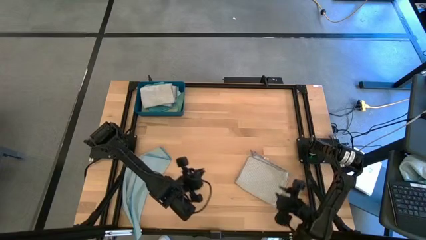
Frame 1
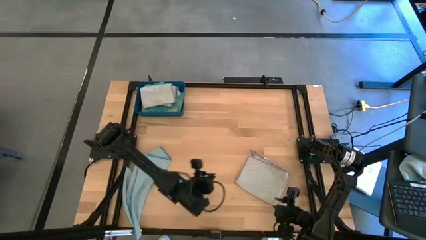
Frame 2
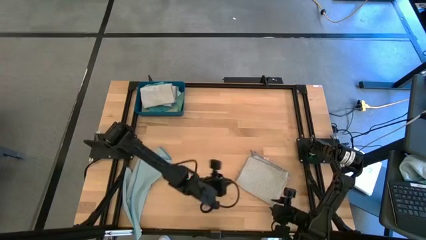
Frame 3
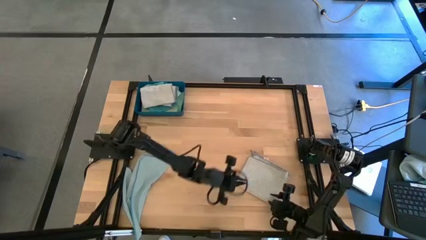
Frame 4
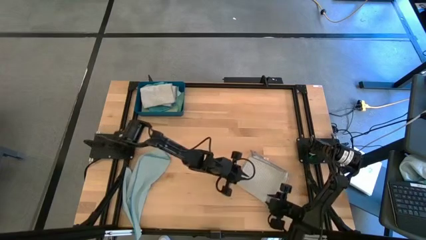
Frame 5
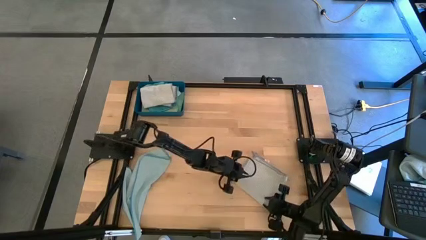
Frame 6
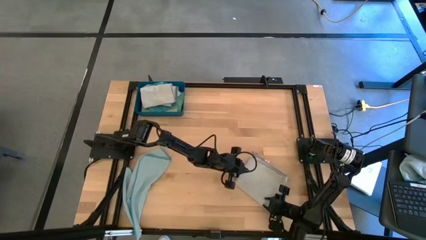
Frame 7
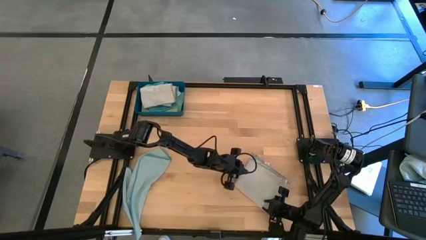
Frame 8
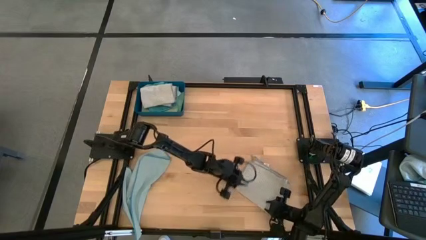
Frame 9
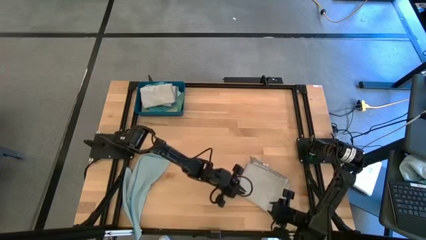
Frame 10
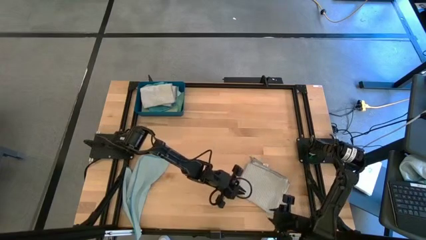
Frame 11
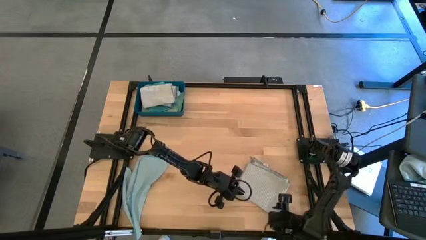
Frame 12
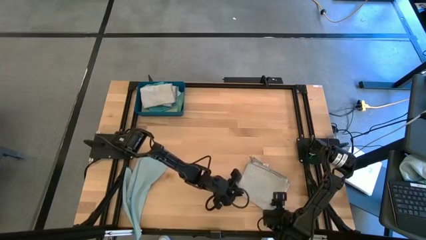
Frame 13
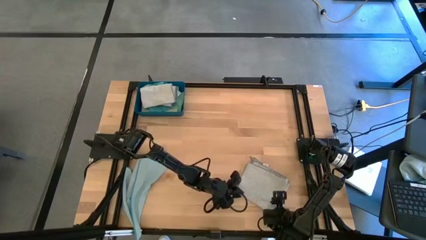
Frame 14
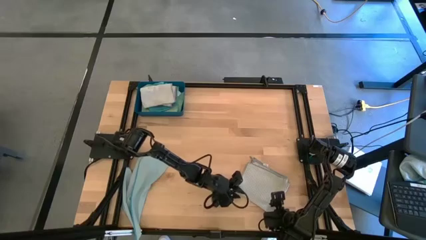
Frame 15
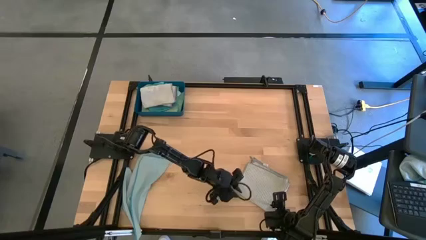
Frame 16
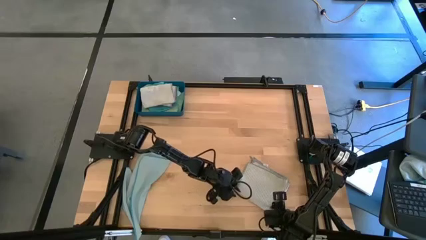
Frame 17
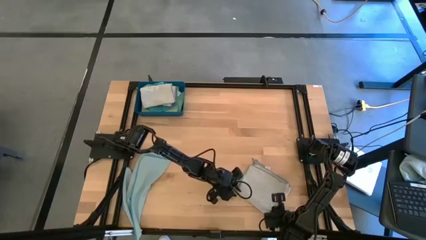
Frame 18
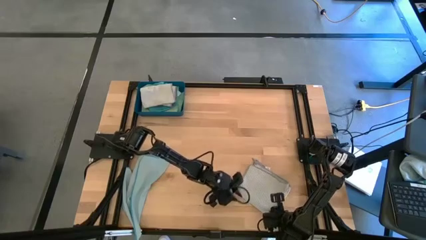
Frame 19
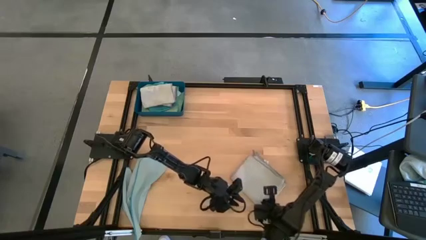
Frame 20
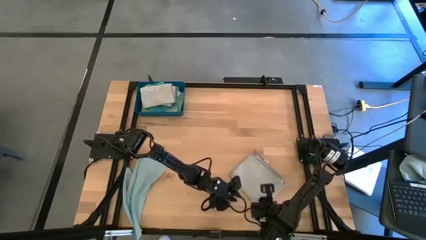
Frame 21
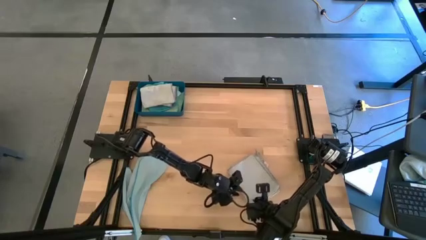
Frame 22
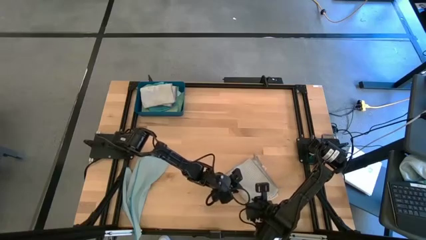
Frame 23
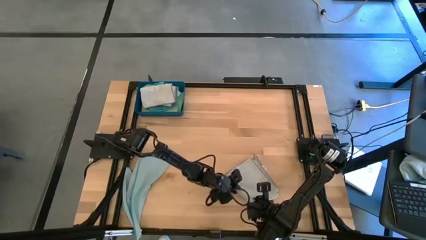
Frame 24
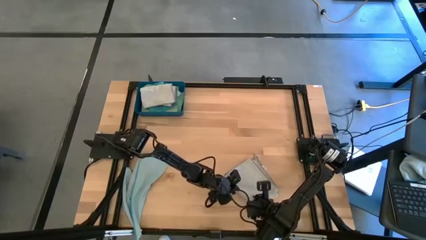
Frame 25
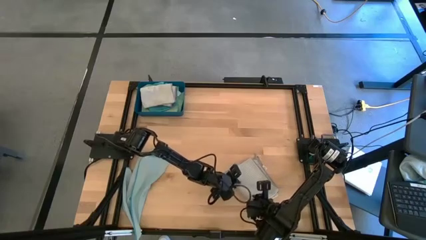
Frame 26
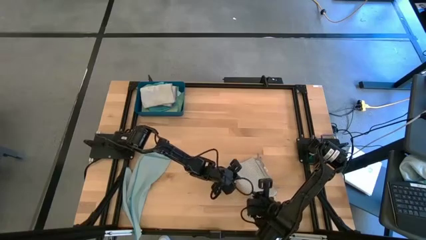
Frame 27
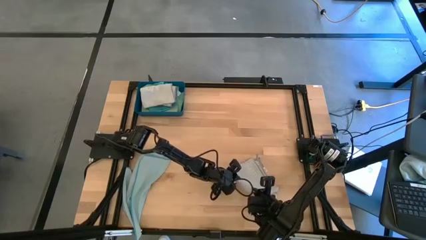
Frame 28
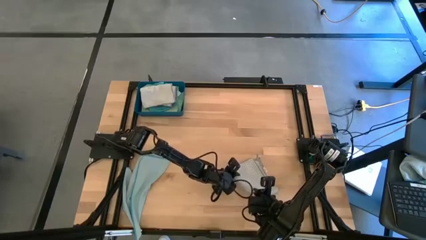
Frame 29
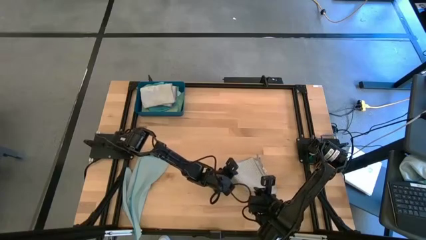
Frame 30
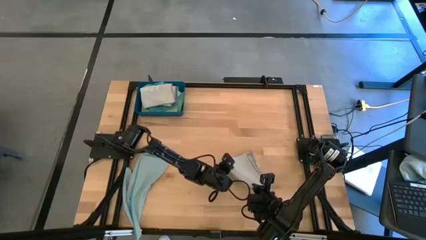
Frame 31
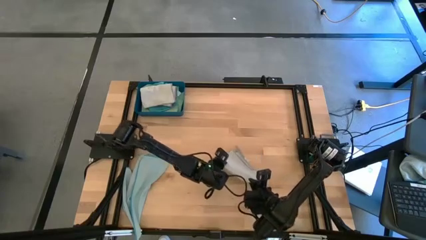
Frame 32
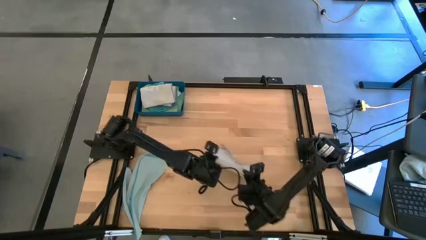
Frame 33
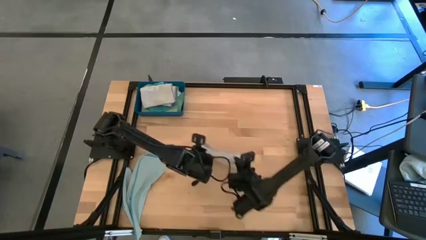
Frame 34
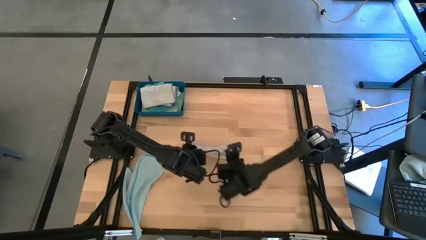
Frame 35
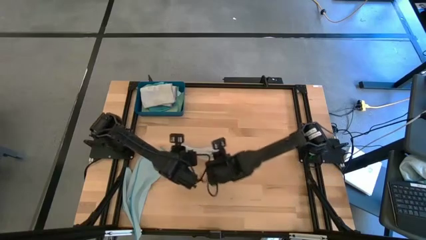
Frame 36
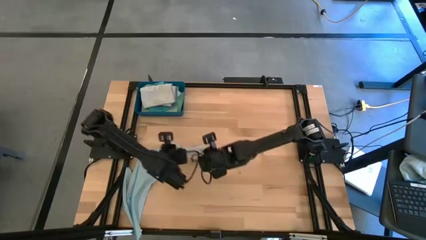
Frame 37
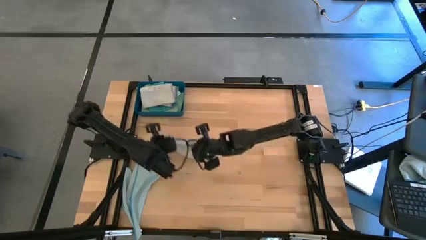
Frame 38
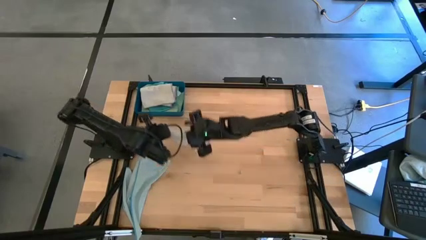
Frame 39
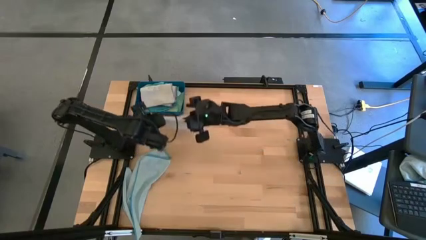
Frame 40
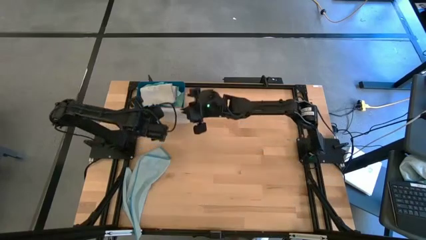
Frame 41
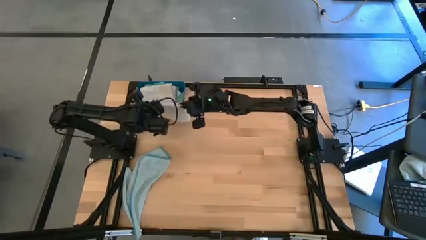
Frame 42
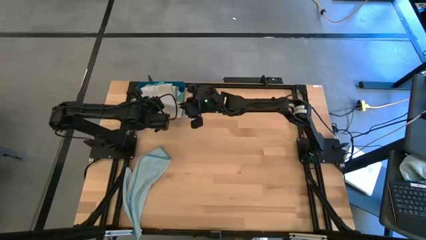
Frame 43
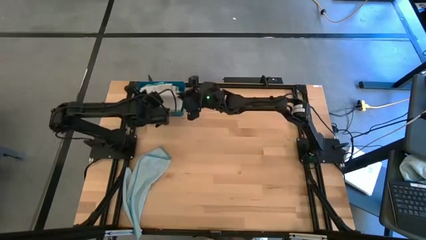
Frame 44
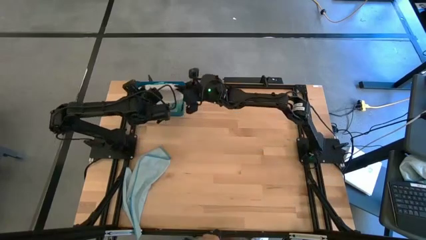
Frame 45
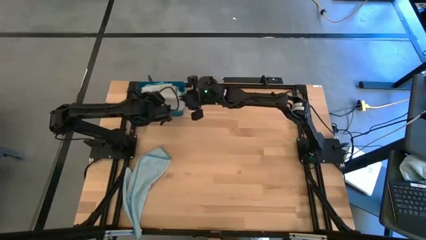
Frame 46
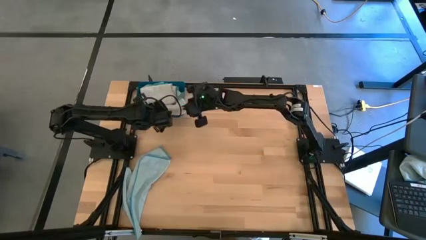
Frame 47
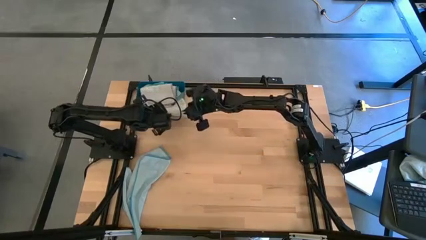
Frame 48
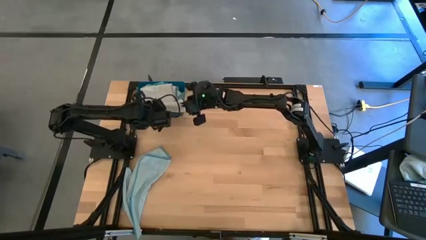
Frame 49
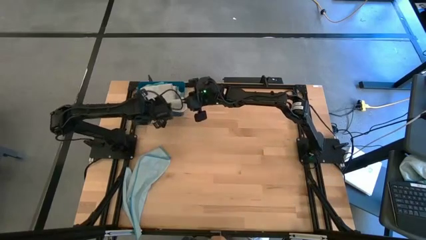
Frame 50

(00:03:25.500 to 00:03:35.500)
Task: Fold microfiber towels
Put the gray towel into the blue bin

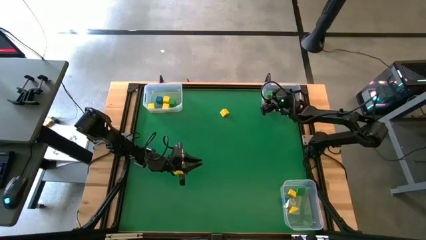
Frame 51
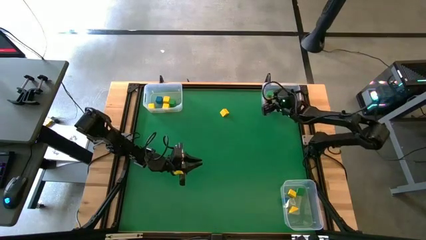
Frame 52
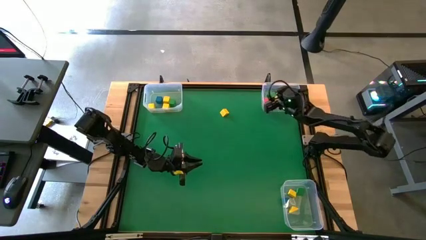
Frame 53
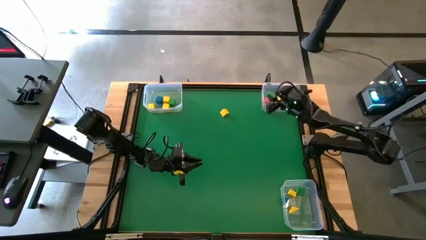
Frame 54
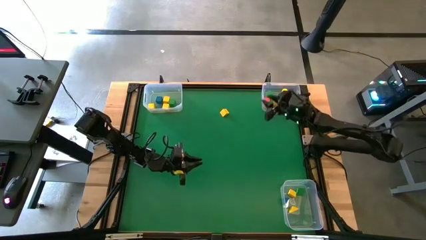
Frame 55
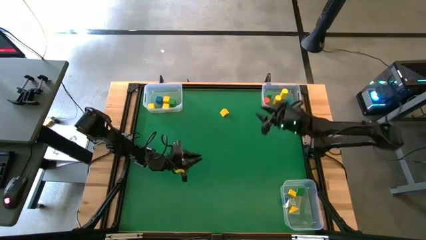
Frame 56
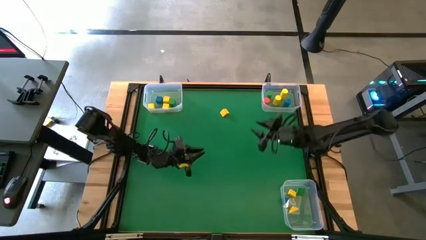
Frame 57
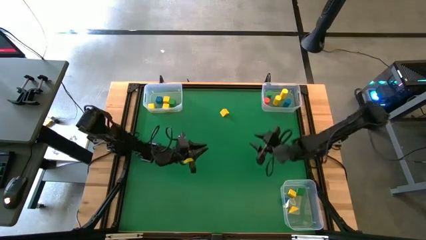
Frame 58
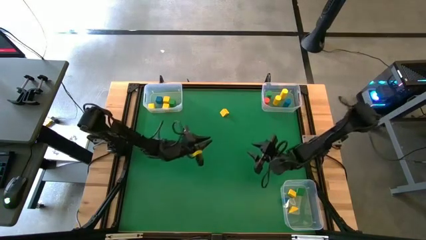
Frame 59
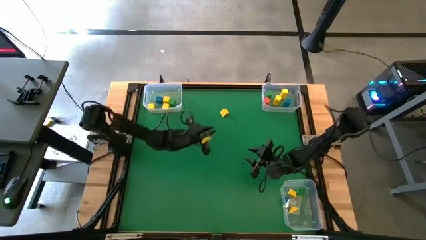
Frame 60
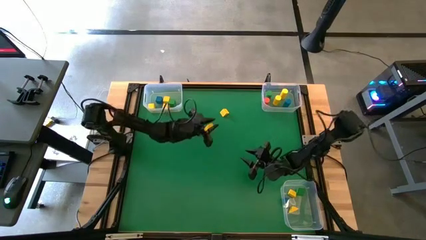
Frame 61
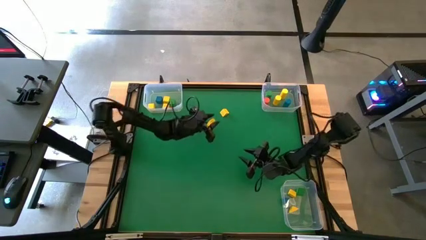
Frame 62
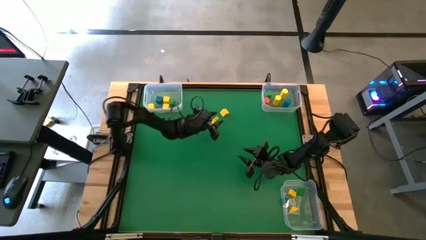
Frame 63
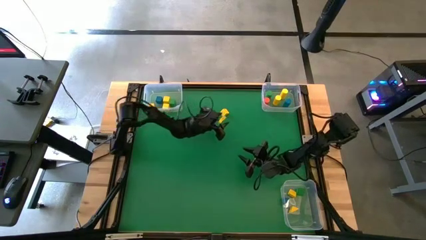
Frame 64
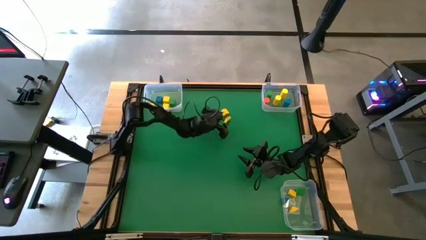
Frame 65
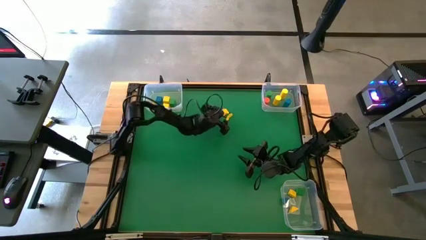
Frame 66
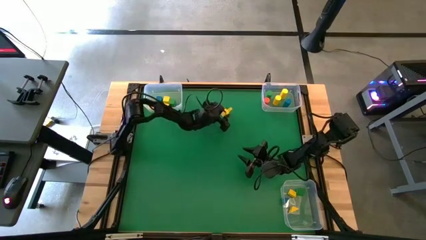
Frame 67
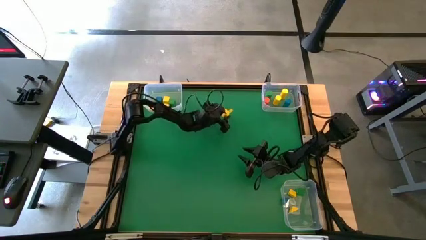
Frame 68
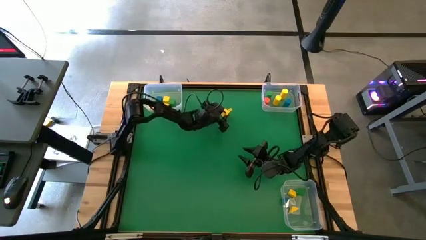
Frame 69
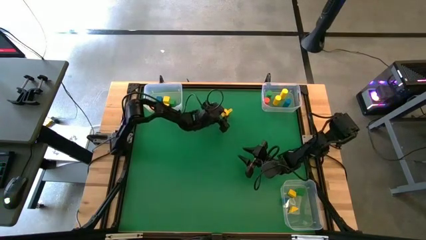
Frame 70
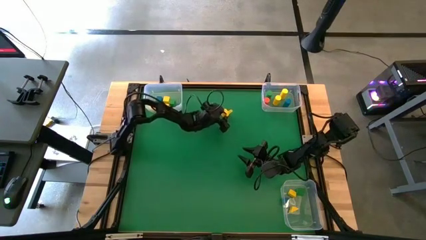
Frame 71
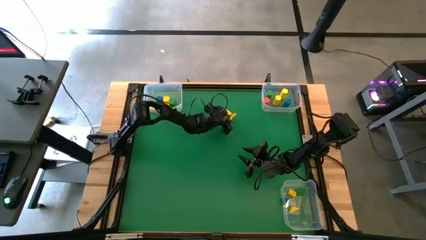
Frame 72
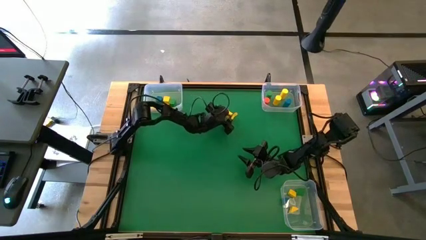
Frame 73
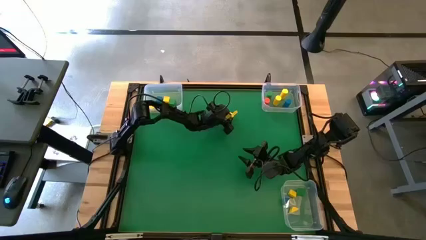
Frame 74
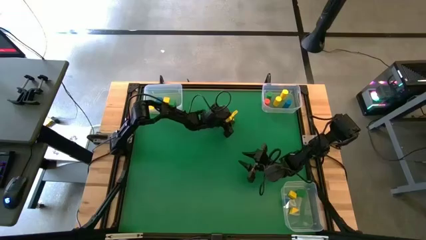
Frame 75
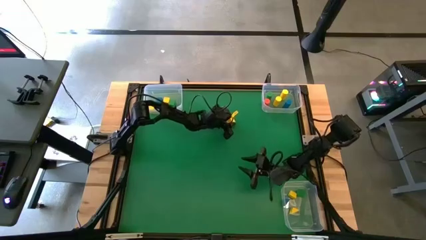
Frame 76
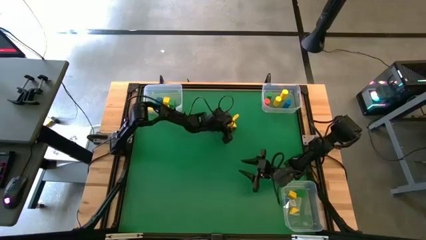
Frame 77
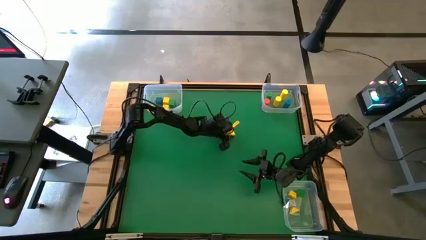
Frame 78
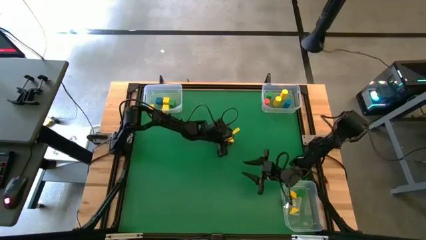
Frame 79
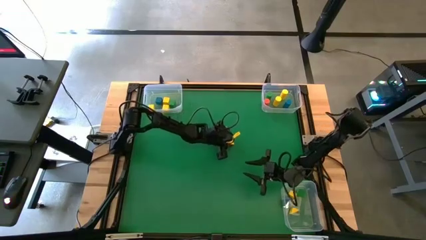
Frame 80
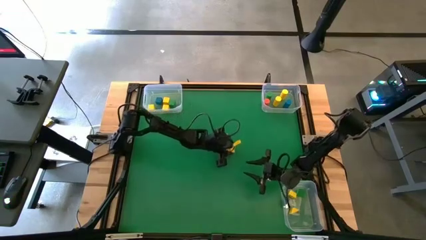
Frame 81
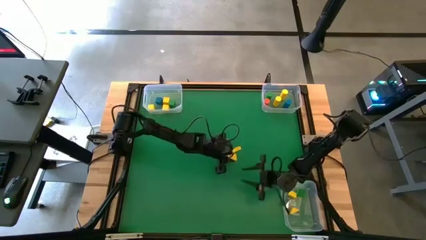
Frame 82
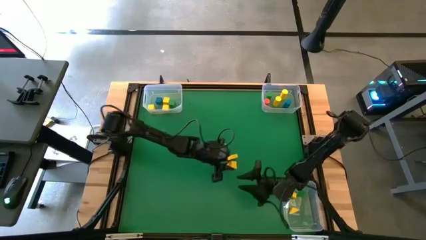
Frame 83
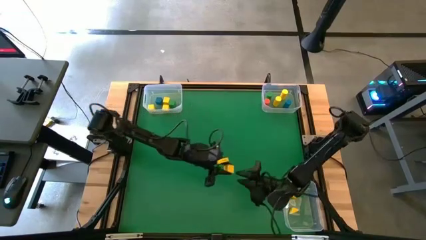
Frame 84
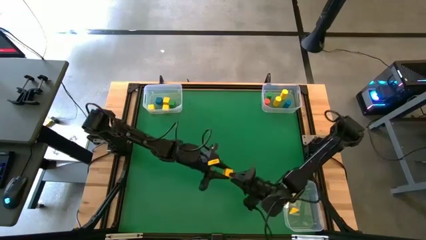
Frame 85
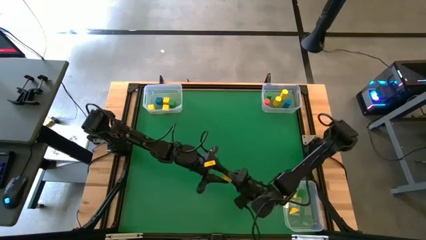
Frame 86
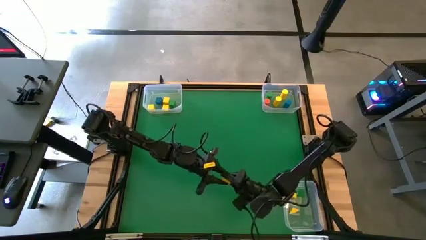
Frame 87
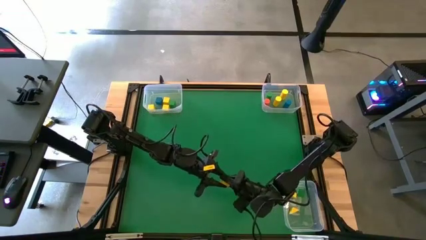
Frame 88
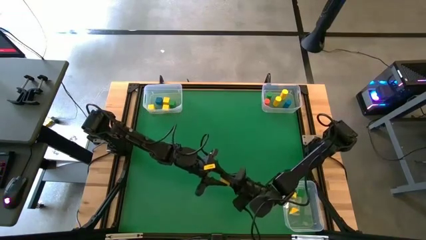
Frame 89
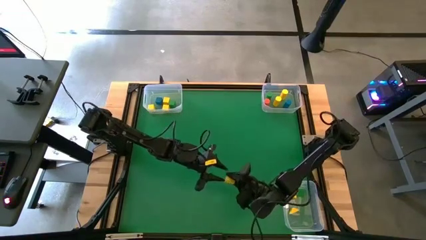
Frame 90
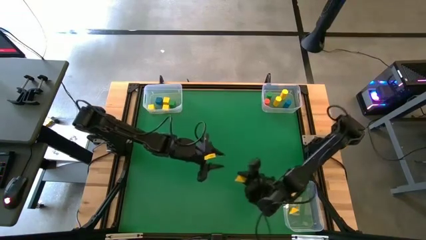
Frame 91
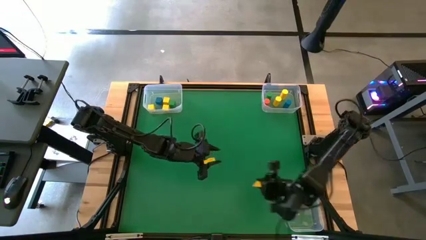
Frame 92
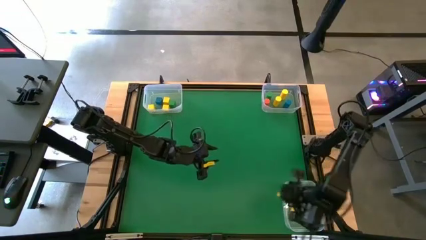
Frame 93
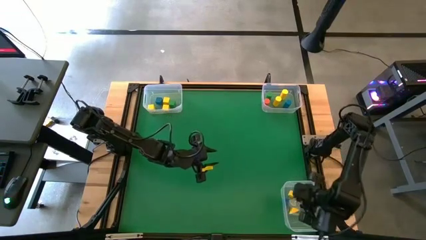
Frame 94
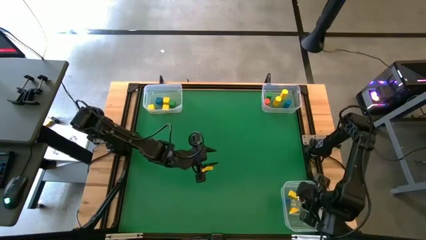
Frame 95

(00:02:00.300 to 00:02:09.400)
Task: Sort blocks by size
Put the yellow triangle block into the bottom transparent bin
